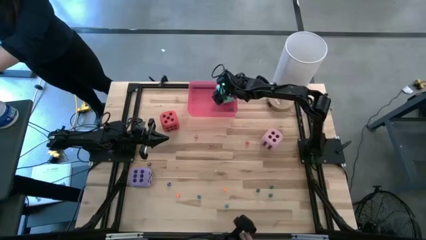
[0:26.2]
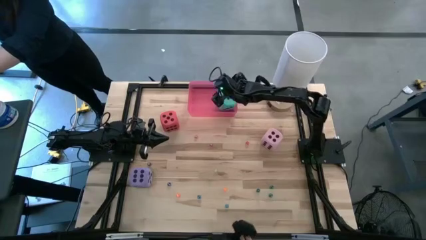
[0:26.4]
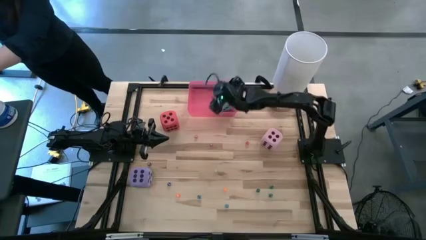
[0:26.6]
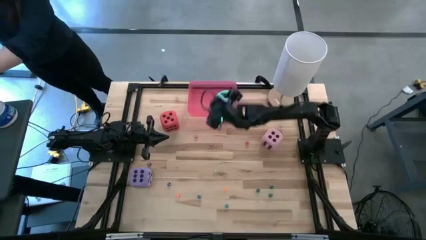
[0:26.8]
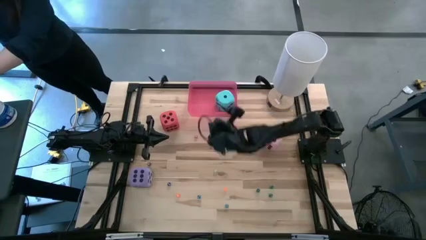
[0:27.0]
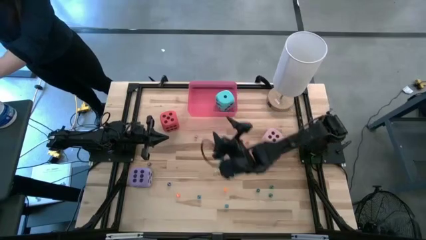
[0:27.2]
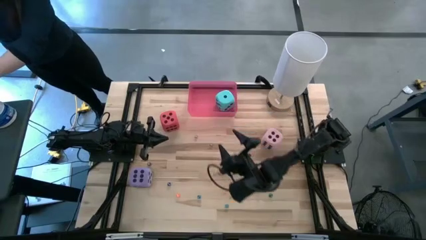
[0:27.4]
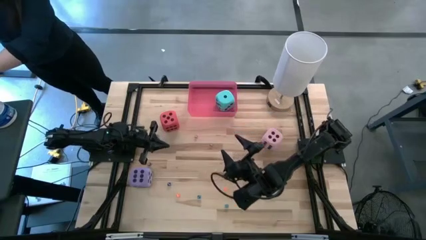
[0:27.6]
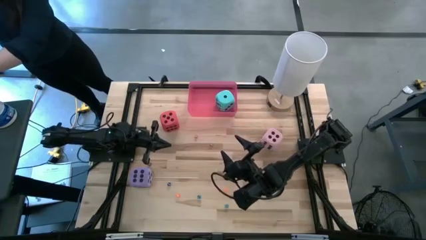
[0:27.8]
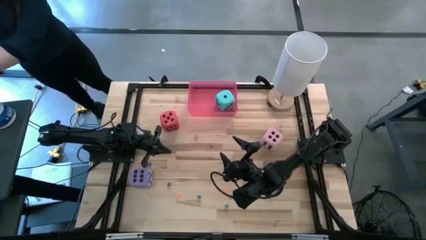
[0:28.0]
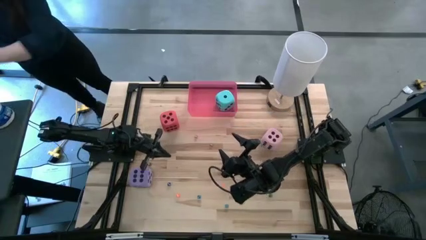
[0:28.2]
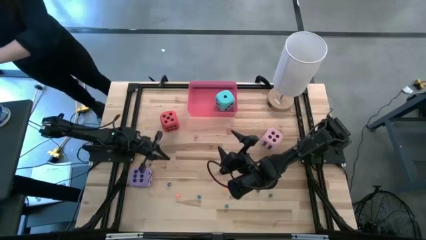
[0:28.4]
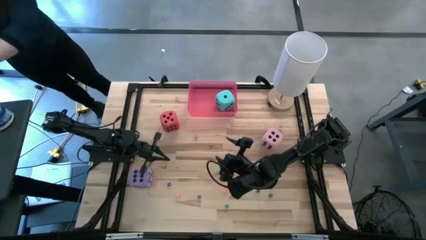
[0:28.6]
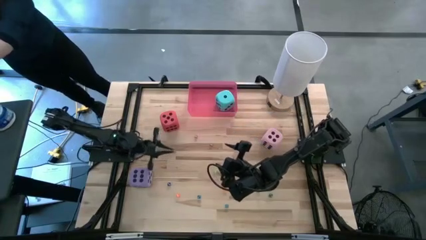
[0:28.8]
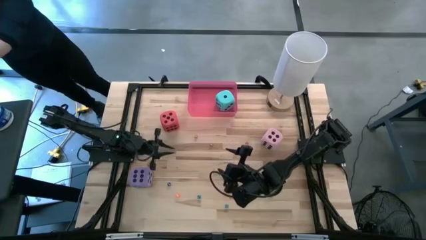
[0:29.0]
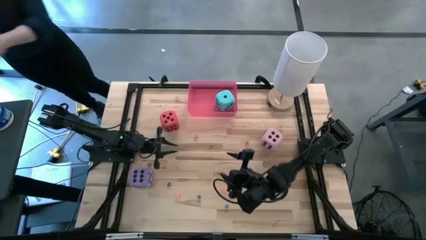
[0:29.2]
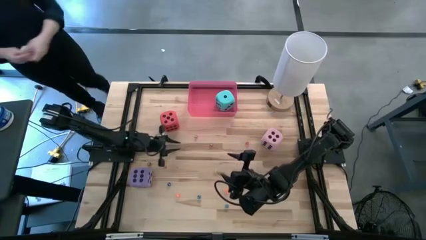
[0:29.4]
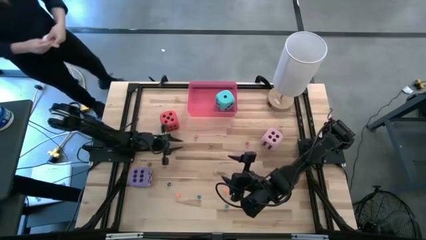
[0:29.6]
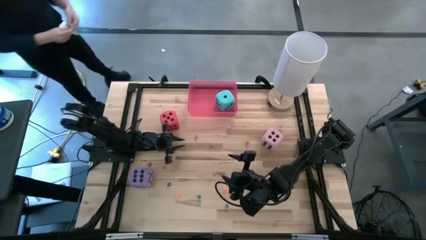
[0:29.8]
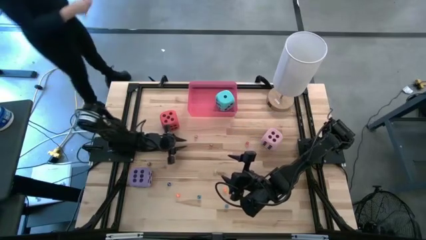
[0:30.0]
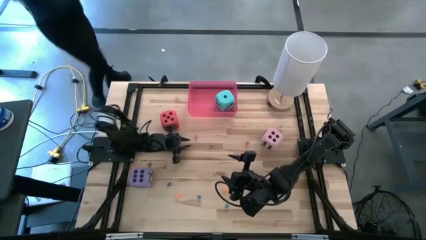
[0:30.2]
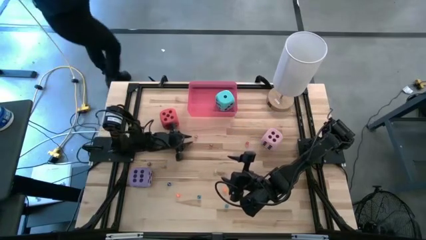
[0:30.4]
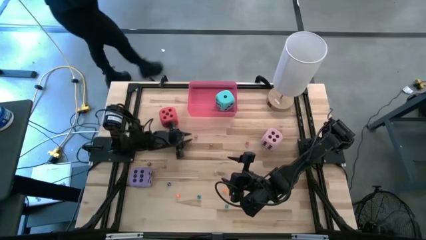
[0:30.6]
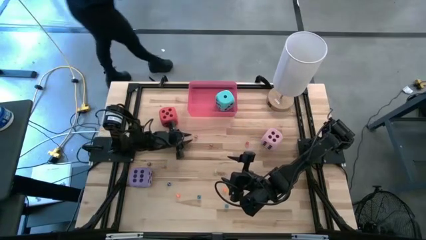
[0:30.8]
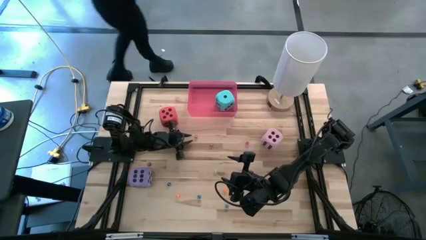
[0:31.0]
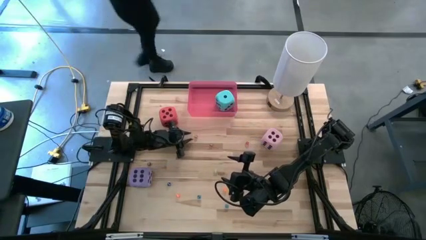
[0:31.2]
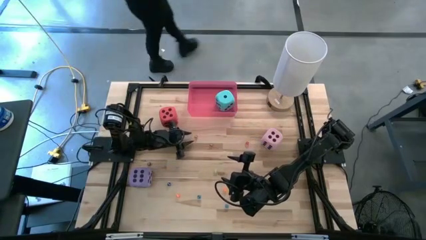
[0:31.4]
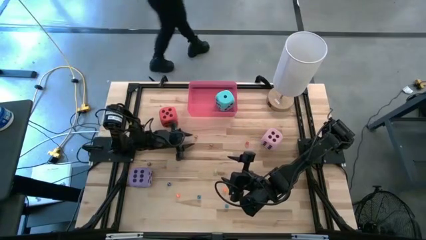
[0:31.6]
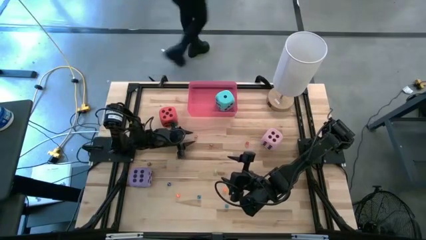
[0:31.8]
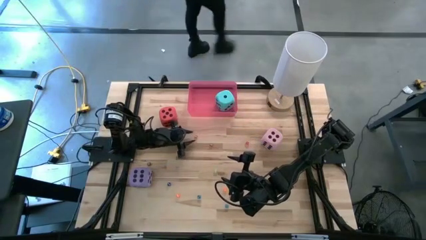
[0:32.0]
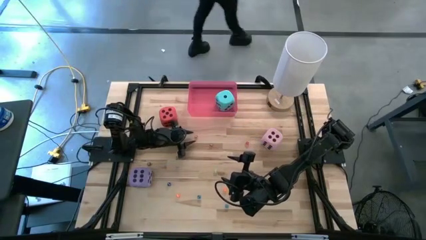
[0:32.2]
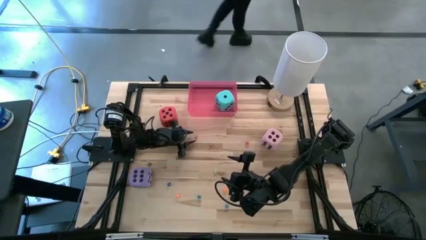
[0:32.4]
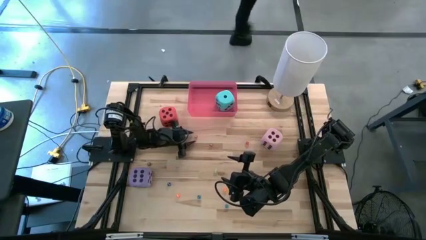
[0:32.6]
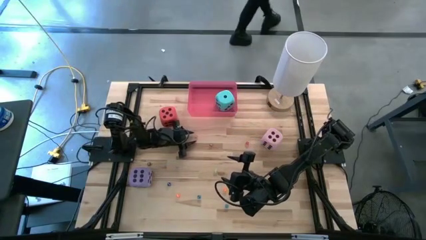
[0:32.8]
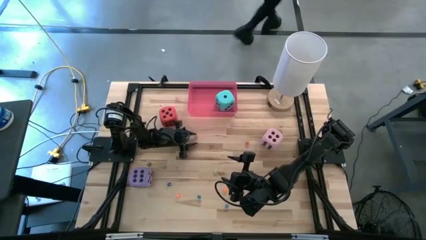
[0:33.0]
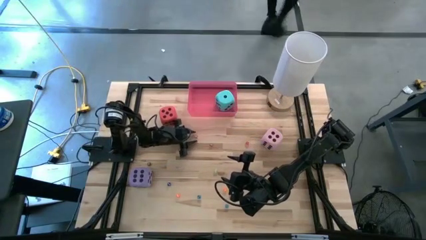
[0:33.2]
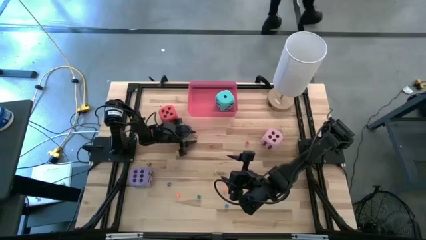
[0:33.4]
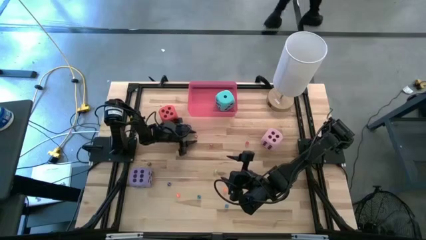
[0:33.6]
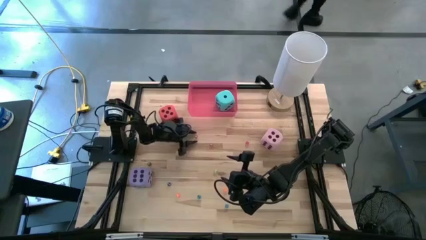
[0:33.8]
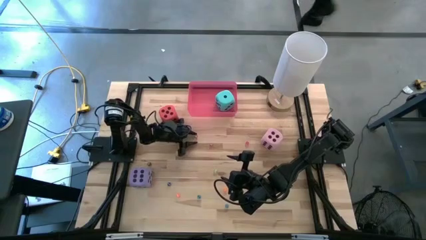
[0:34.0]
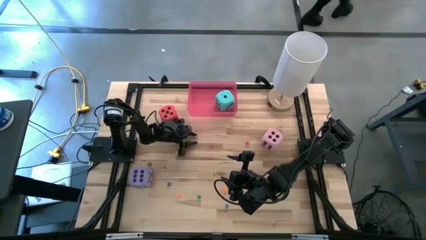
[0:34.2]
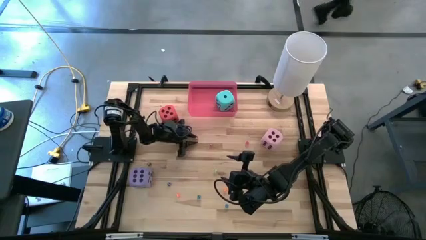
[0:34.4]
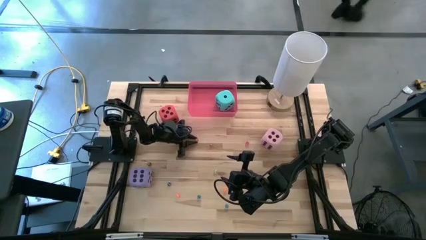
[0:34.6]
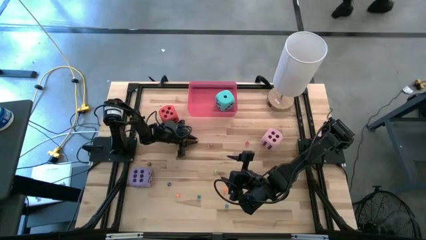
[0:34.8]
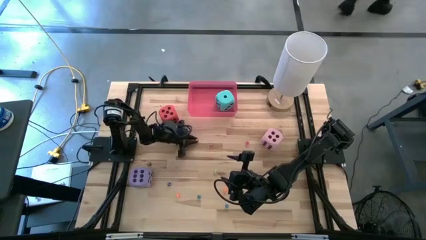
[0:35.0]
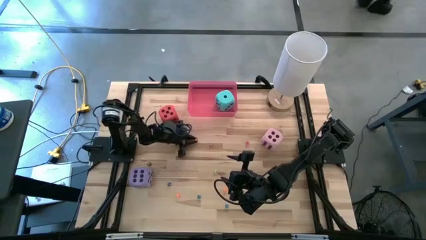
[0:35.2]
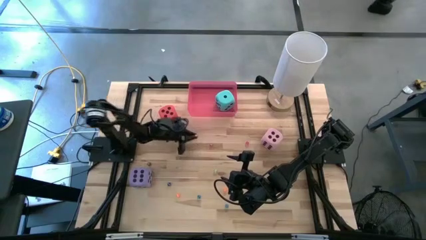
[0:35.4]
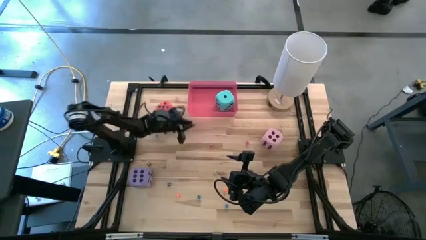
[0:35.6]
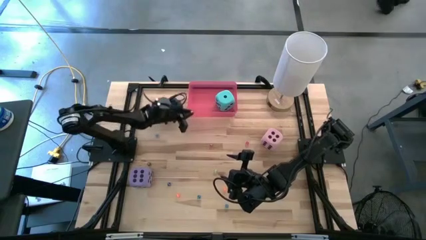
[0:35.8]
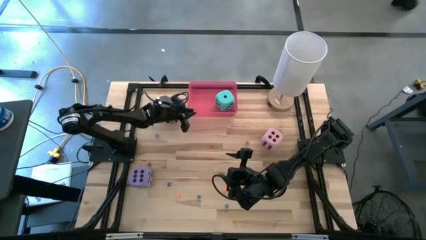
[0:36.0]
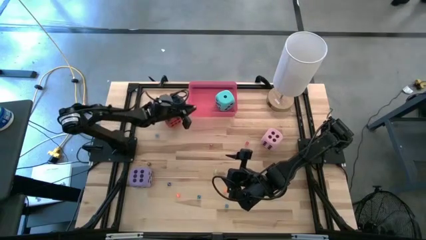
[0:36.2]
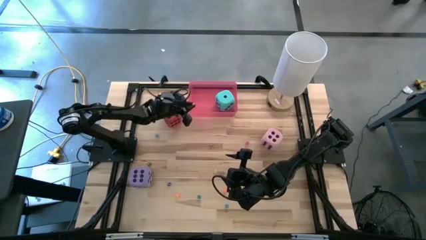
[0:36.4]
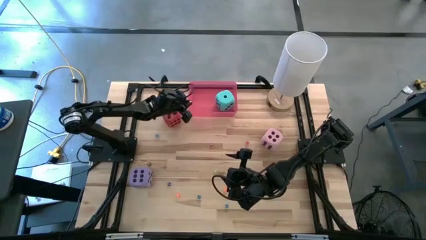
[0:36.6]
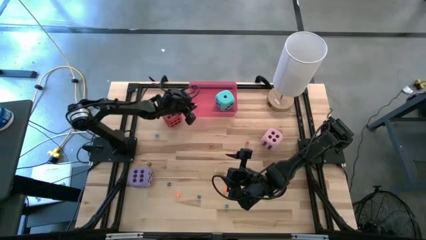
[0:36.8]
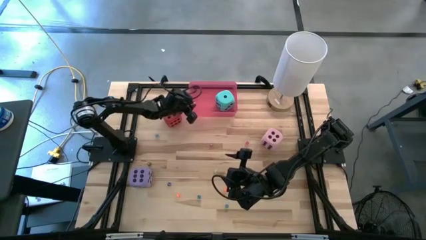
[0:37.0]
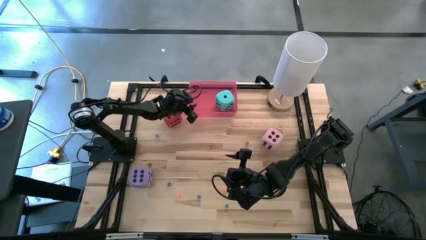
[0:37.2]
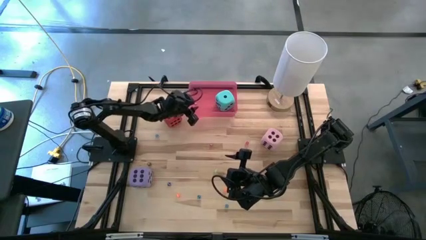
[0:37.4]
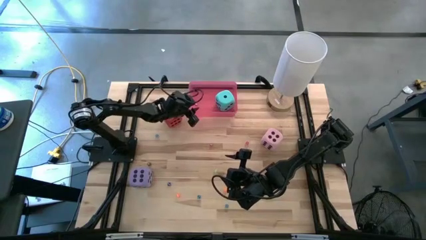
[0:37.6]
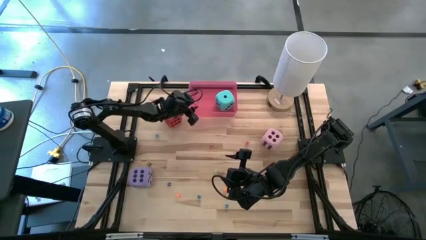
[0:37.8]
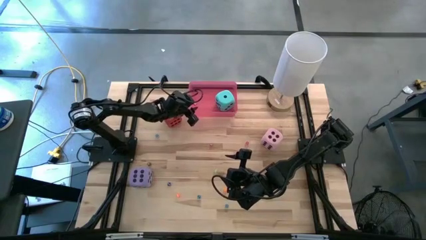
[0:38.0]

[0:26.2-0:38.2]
Task: Pick & Place Dice
Put the small red dice into the pink bin
